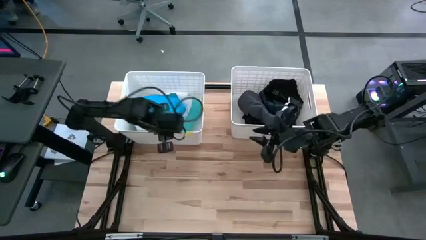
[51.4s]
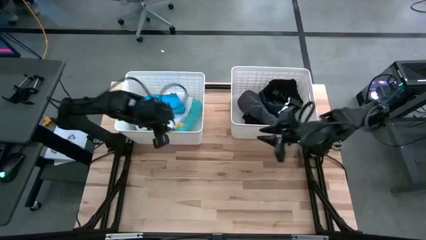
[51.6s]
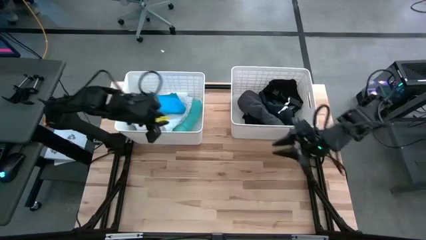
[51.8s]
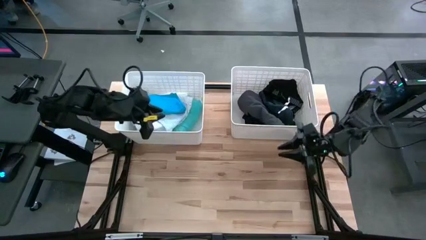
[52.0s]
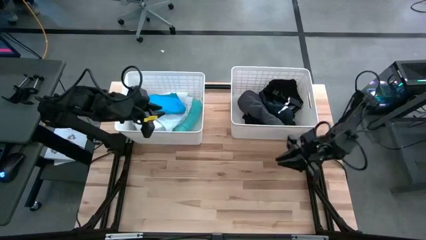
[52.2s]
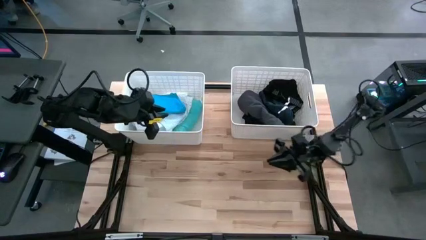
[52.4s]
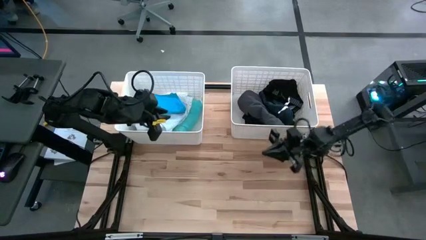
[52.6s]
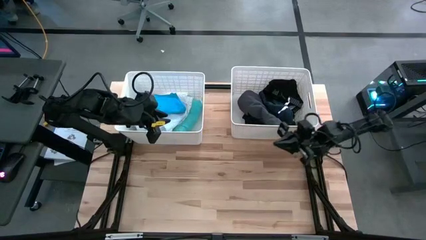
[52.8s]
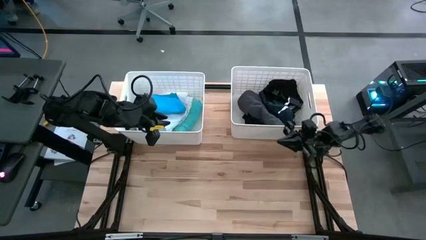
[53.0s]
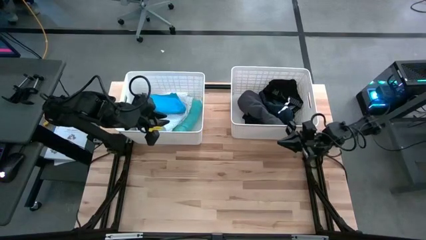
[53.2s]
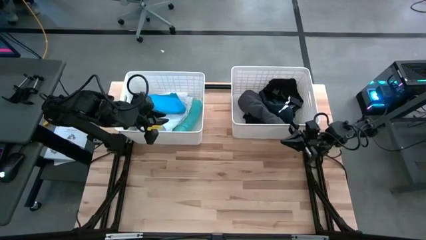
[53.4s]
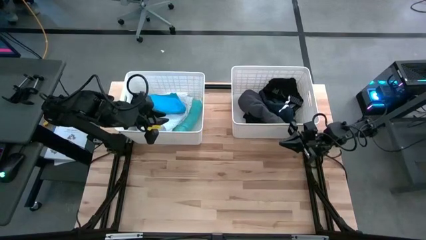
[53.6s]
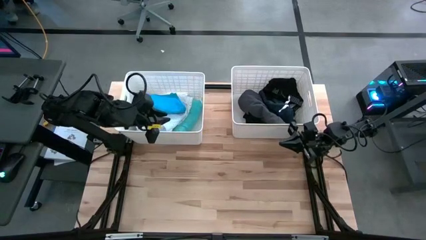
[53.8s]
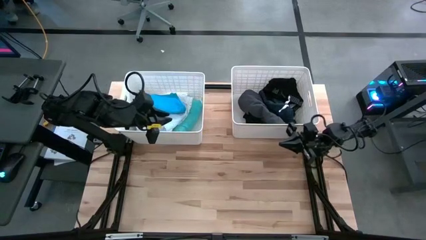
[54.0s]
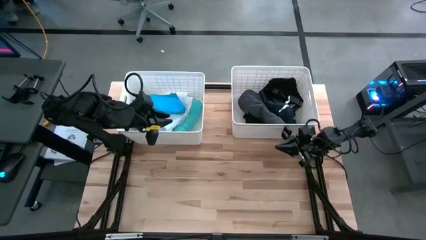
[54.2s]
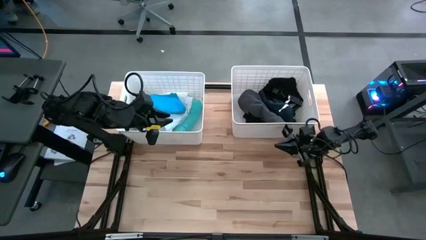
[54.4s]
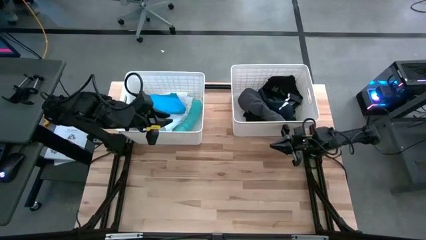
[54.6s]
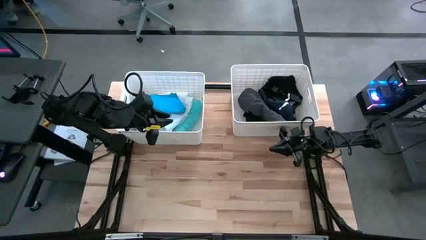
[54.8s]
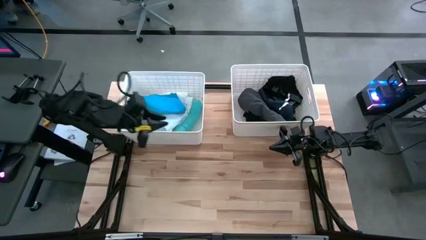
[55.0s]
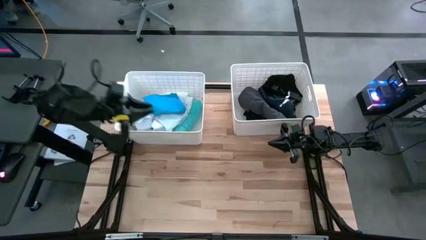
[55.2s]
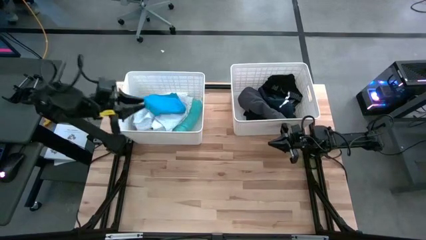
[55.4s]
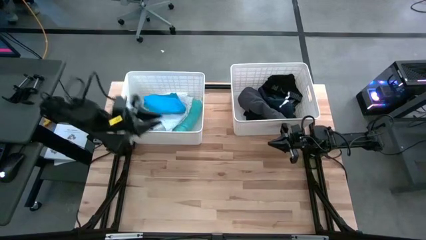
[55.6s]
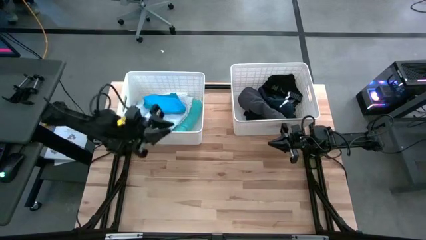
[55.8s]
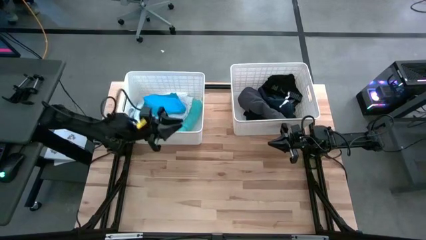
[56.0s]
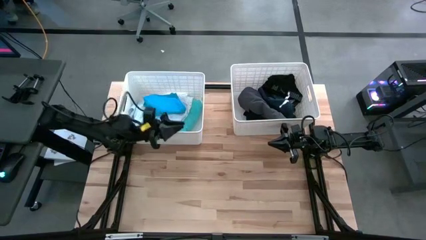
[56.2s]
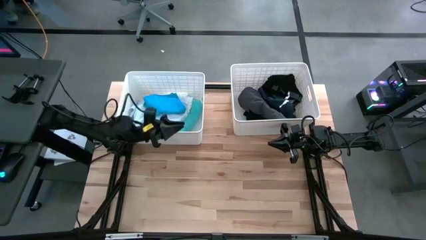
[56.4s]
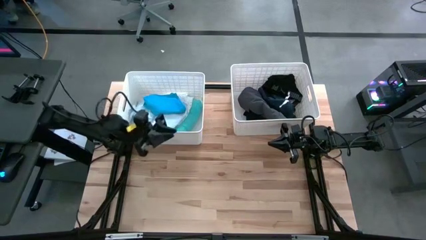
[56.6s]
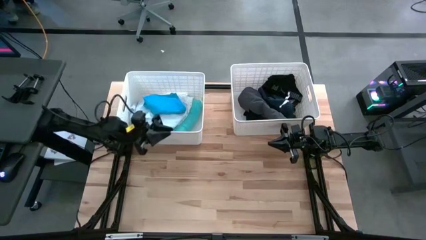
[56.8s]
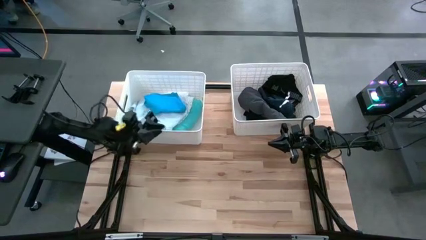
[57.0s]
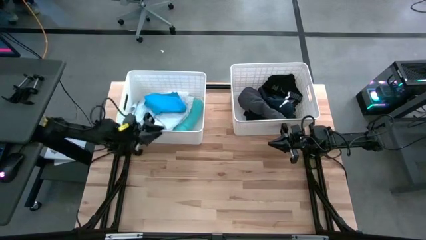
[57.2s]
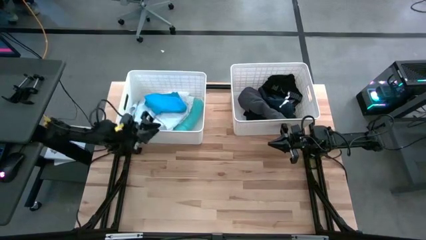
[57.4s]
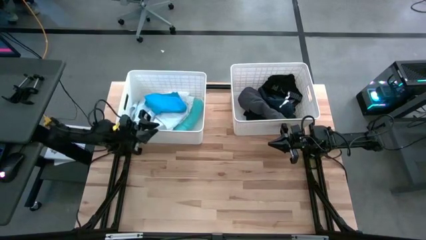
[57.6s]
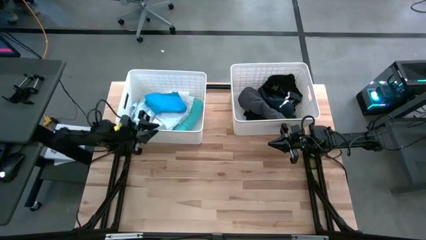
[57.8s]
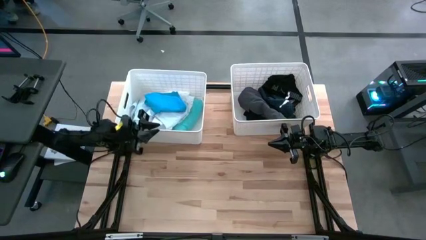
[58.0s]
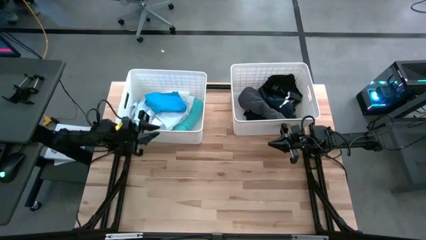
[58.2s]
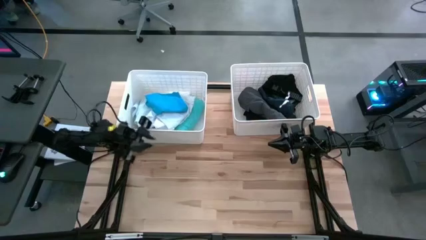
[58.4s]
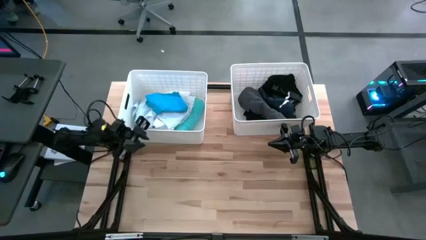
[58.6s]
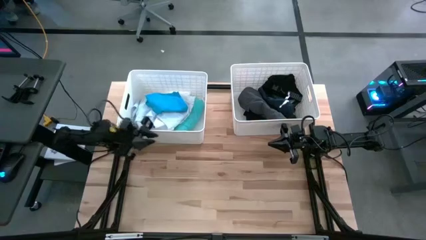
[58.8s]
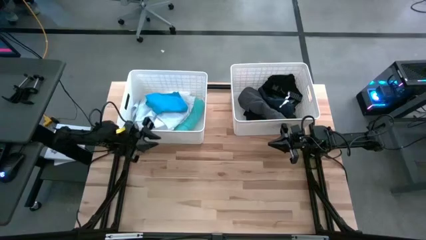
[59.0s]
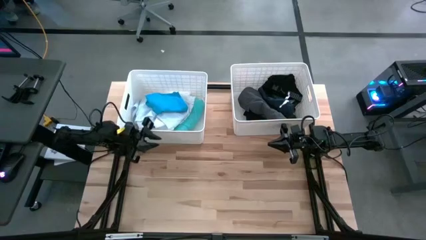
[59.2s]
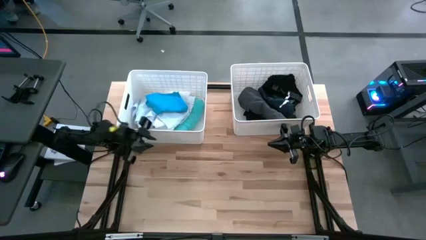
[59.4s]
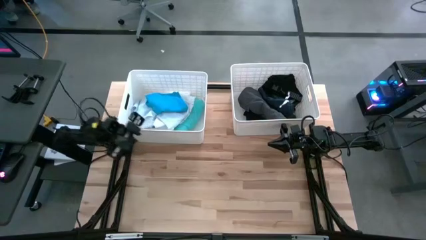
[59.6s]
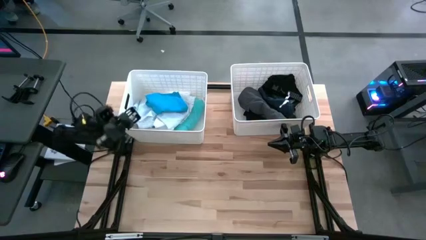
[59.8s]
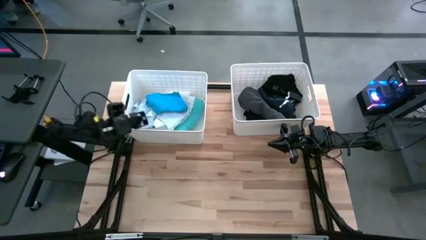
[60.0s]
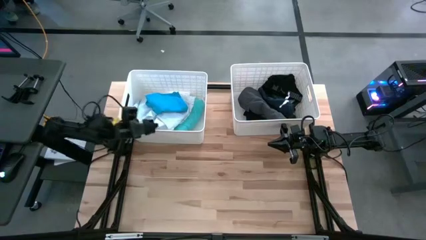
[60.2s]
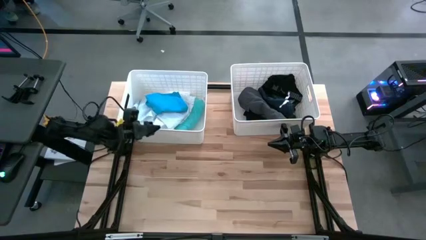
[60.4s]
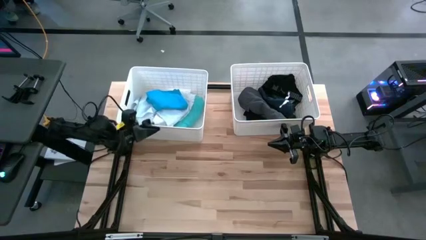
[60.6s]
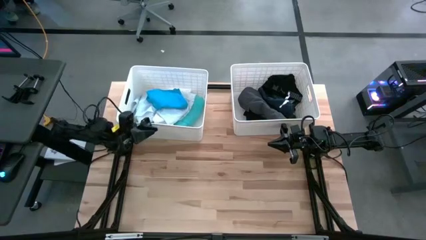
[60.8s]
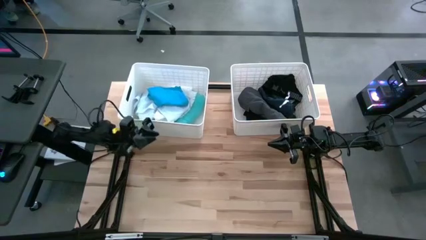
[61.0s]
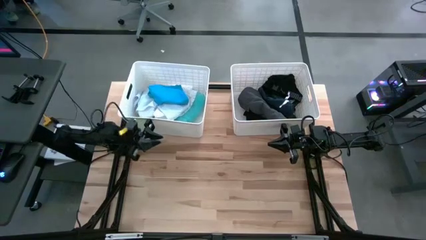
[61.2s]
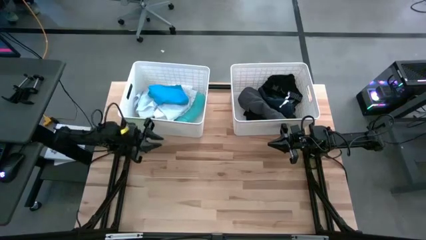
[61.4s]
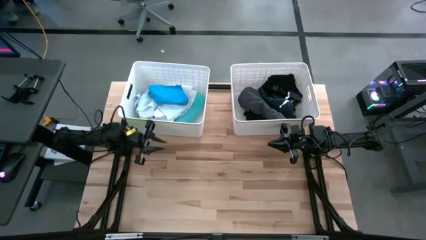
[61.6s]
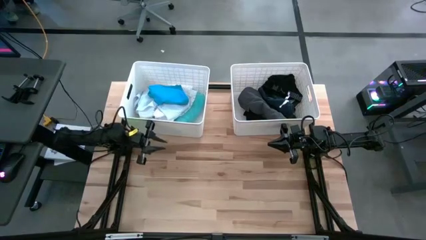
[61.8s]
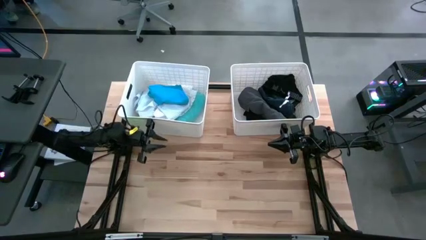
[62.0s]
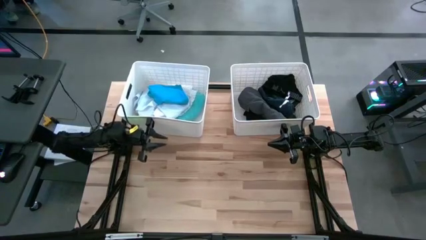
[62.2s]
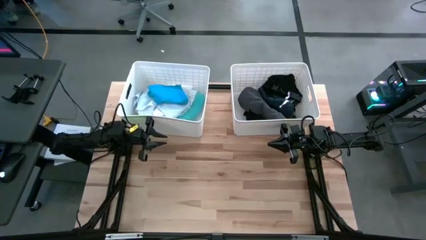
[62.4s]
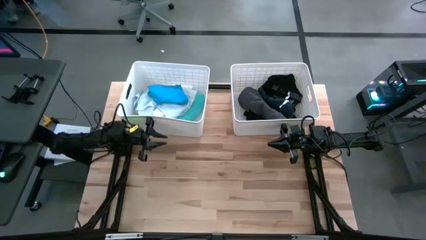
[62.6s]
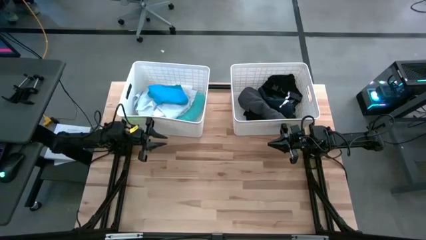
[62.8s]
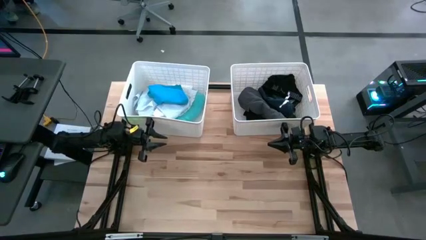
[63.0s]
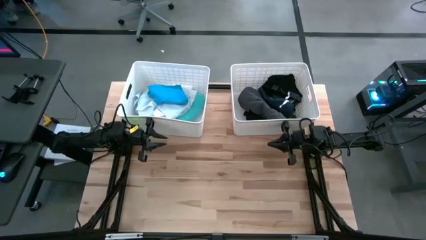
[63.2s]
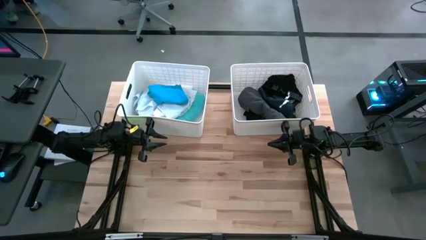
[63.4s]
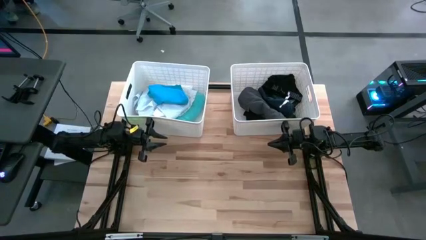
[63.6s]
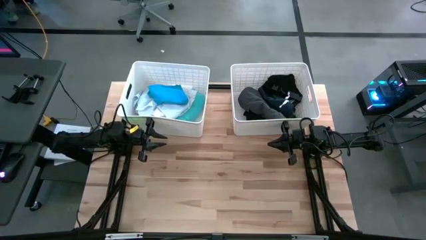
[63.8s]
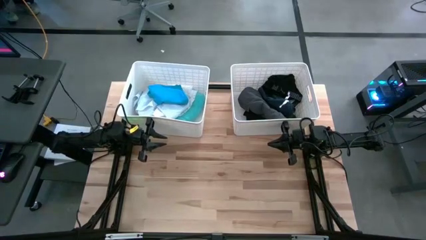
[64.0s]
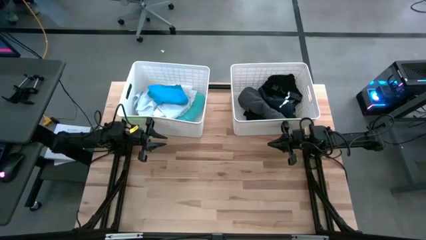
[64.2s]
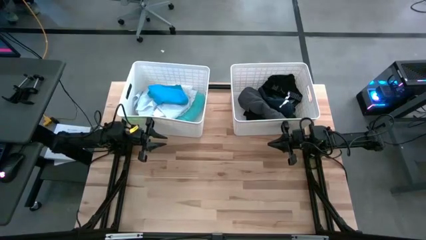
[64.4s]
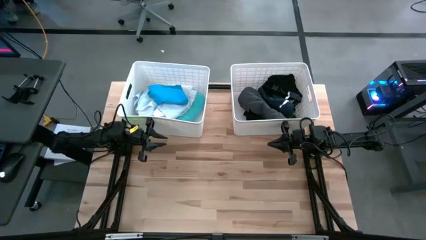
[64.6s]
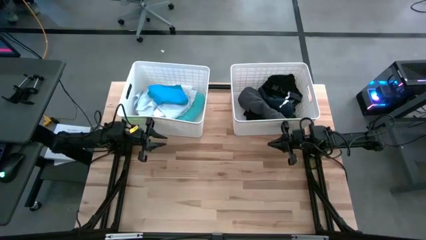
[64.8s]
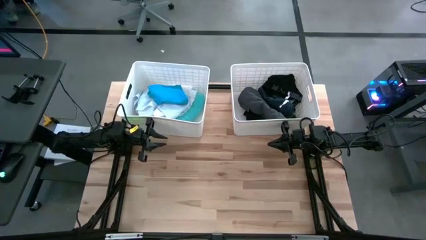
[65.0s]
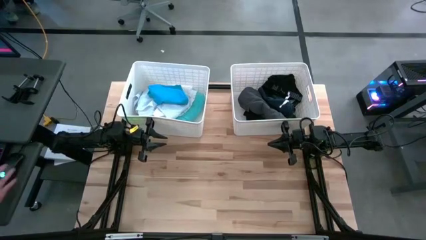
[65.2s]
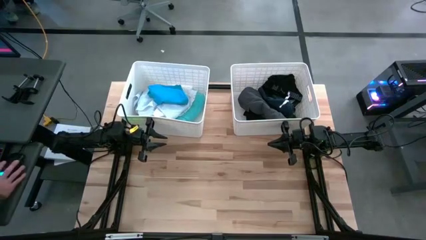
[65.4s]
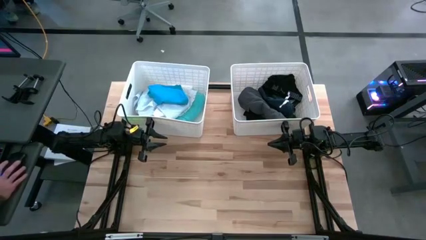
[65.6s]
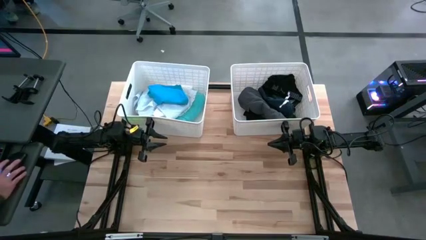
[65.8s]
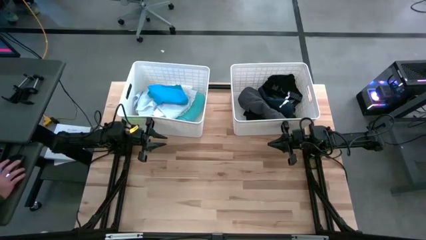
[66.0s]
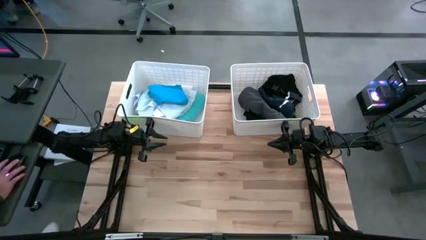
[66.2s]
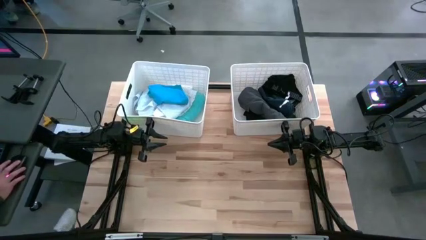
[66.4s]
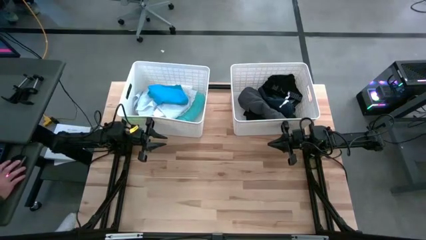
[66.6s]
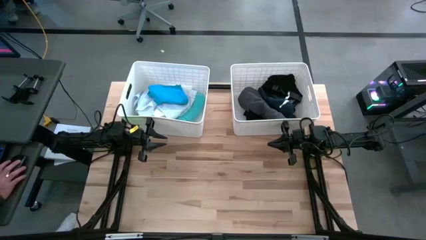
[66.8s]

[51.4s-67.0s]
Task: Sort clothes
Return to Home Position
